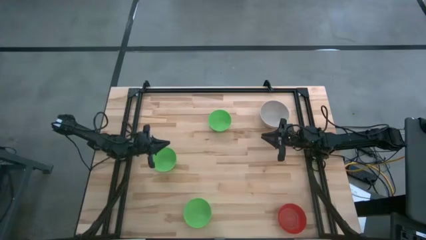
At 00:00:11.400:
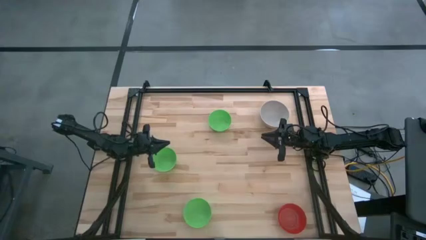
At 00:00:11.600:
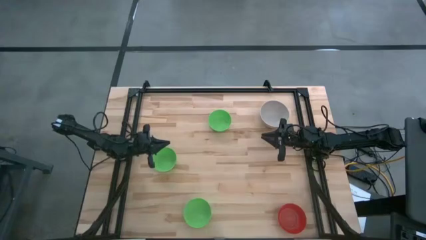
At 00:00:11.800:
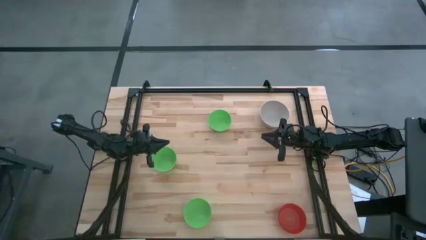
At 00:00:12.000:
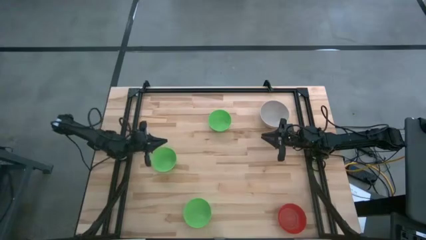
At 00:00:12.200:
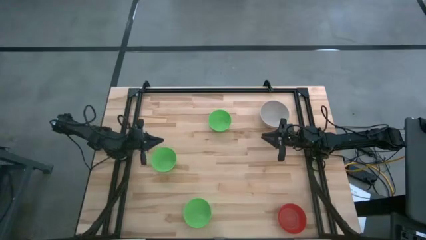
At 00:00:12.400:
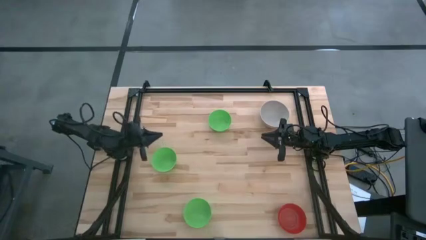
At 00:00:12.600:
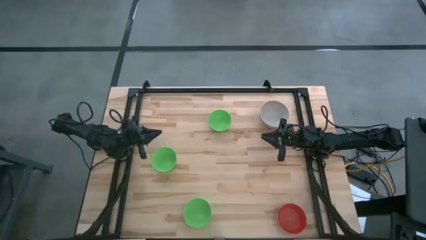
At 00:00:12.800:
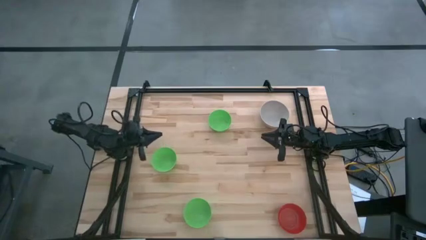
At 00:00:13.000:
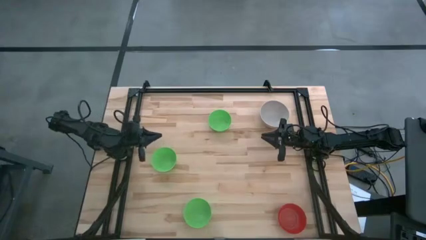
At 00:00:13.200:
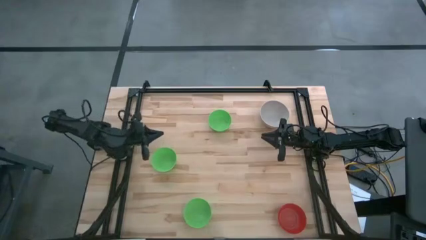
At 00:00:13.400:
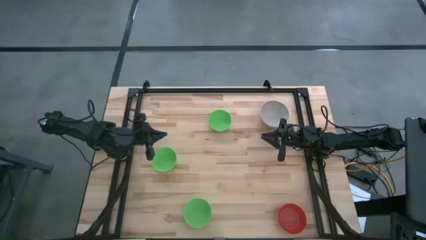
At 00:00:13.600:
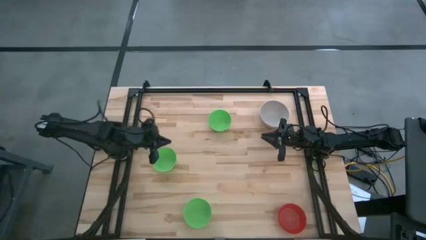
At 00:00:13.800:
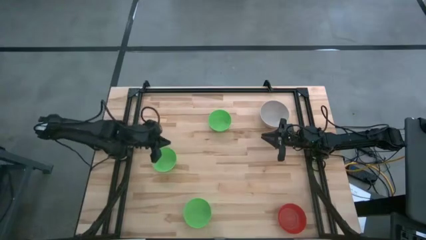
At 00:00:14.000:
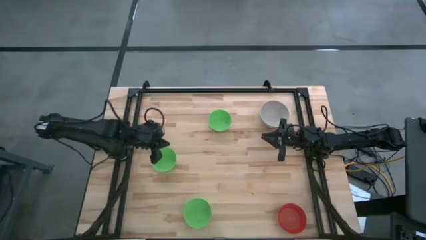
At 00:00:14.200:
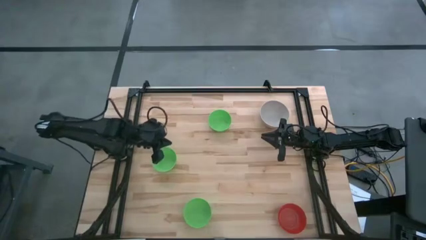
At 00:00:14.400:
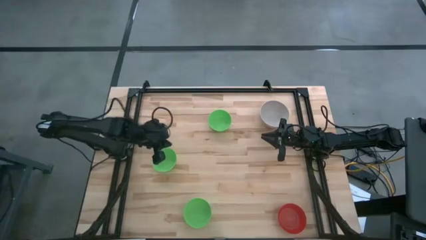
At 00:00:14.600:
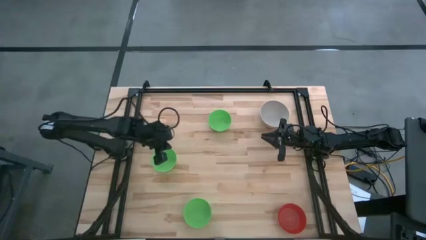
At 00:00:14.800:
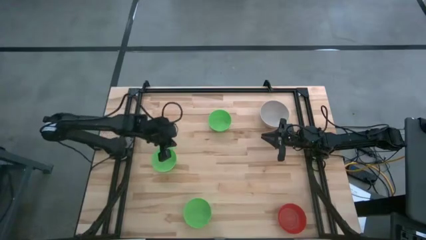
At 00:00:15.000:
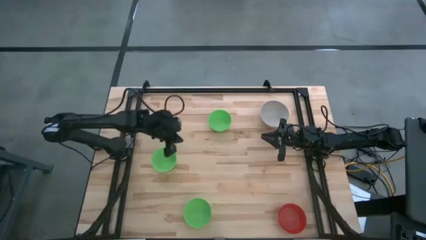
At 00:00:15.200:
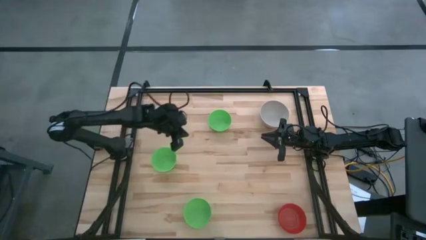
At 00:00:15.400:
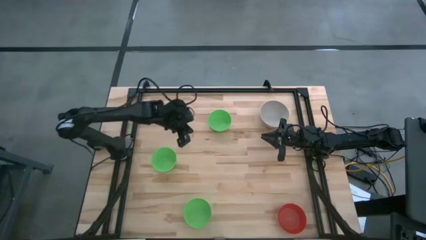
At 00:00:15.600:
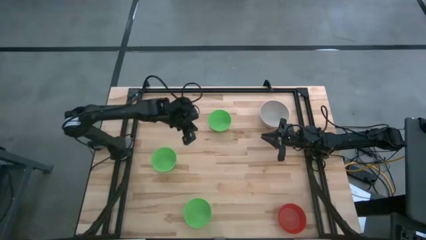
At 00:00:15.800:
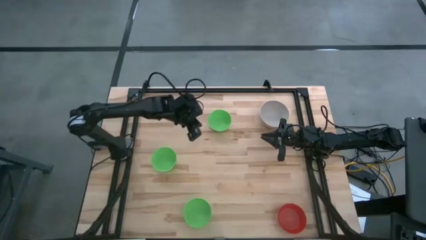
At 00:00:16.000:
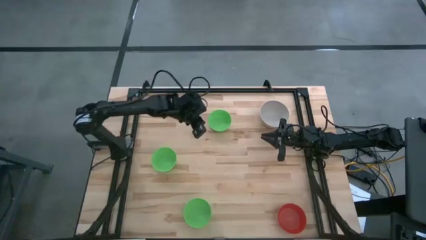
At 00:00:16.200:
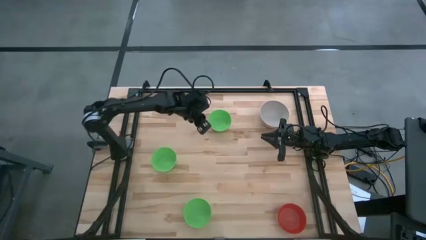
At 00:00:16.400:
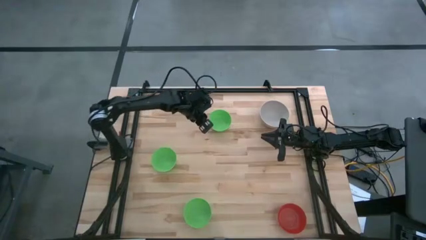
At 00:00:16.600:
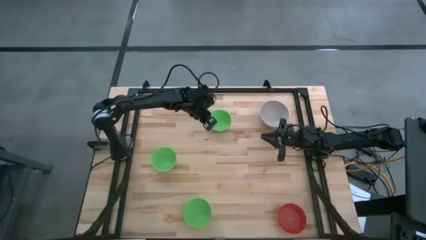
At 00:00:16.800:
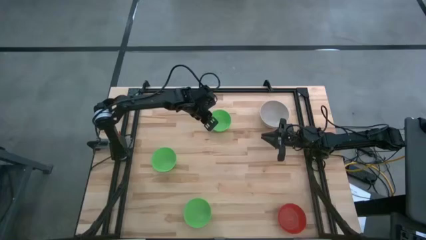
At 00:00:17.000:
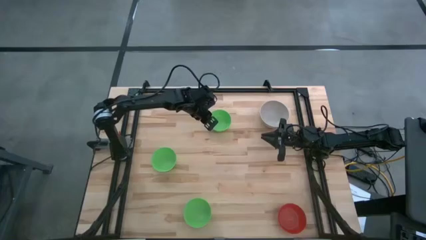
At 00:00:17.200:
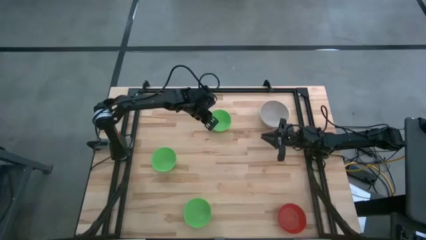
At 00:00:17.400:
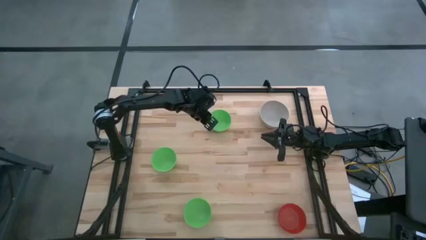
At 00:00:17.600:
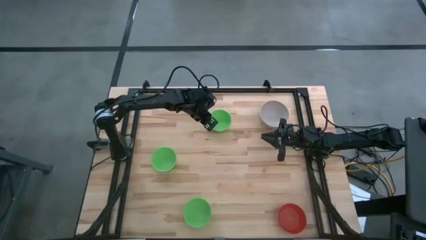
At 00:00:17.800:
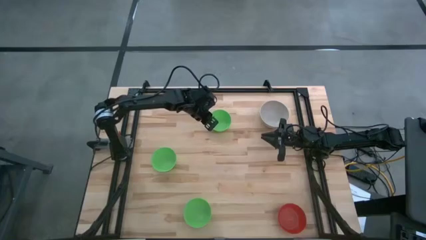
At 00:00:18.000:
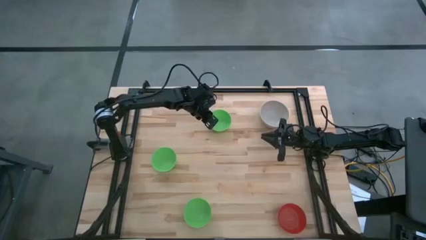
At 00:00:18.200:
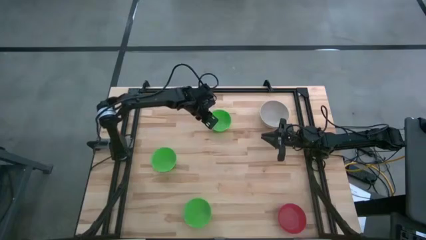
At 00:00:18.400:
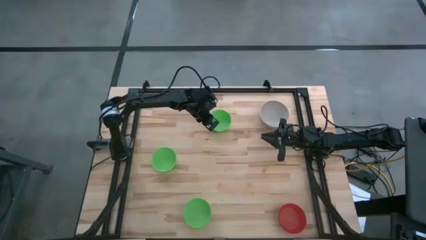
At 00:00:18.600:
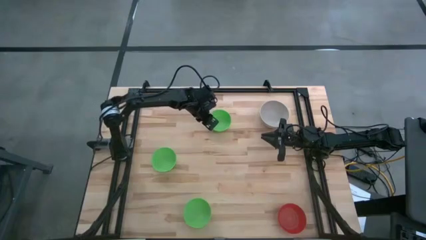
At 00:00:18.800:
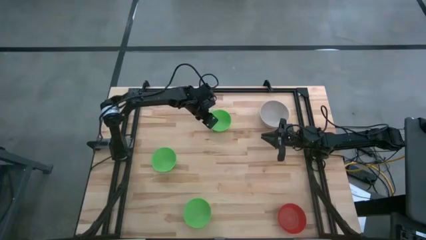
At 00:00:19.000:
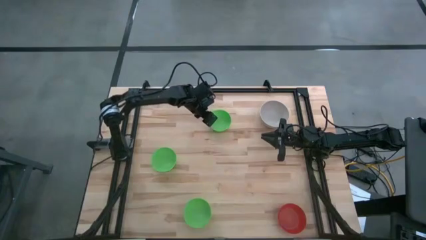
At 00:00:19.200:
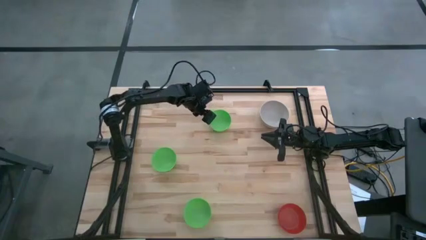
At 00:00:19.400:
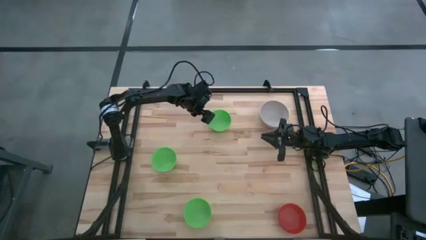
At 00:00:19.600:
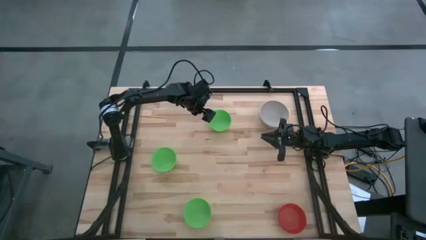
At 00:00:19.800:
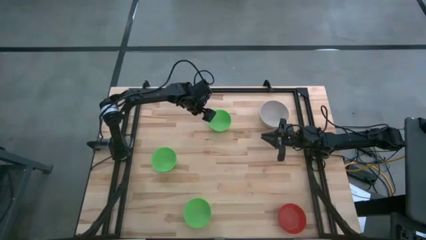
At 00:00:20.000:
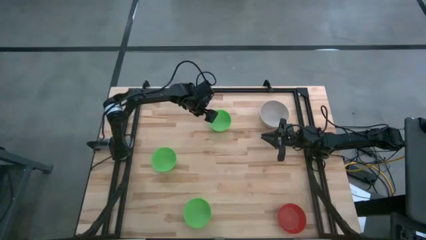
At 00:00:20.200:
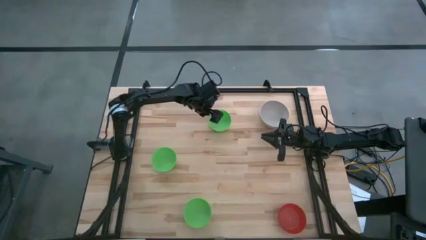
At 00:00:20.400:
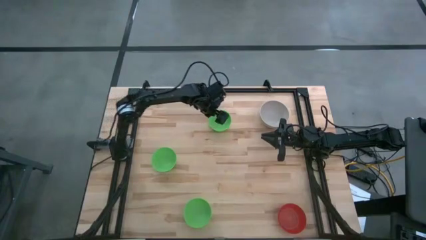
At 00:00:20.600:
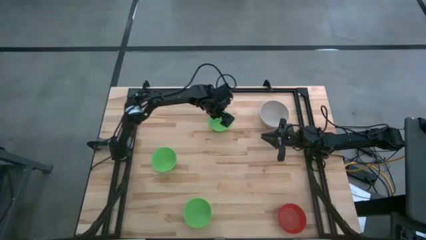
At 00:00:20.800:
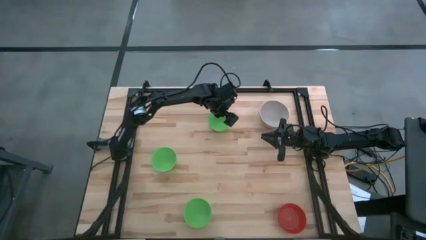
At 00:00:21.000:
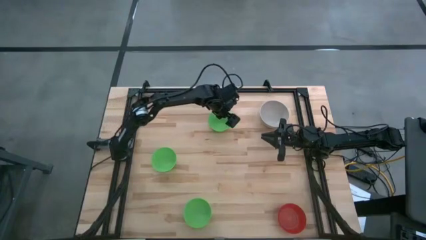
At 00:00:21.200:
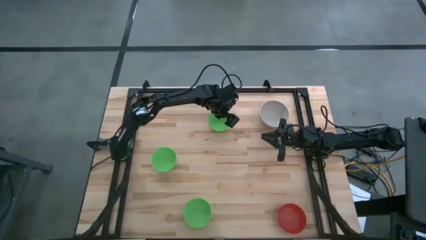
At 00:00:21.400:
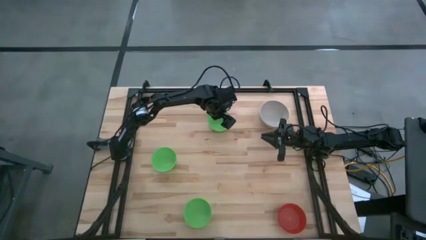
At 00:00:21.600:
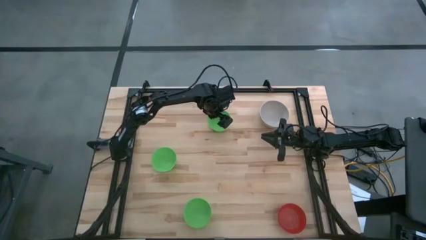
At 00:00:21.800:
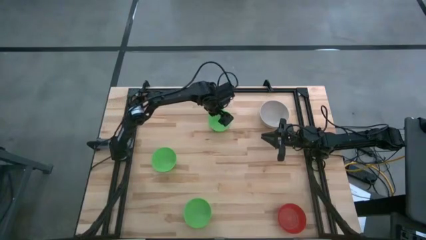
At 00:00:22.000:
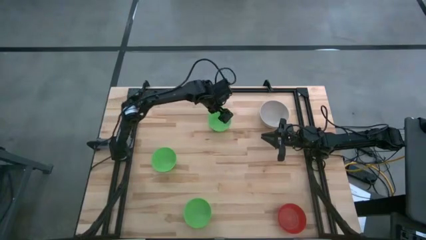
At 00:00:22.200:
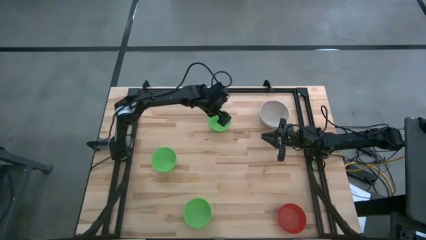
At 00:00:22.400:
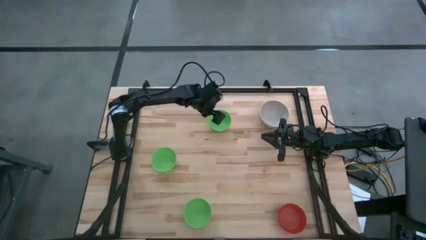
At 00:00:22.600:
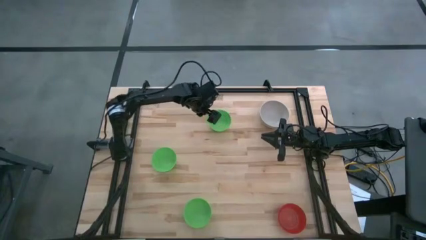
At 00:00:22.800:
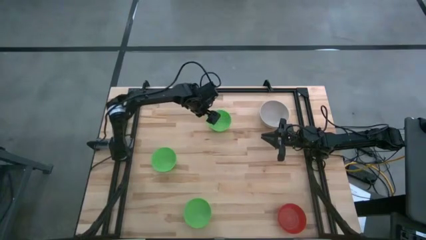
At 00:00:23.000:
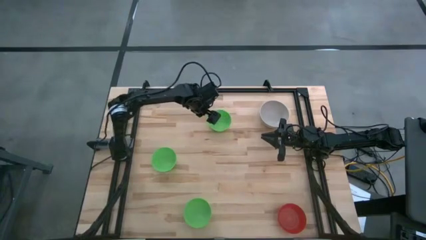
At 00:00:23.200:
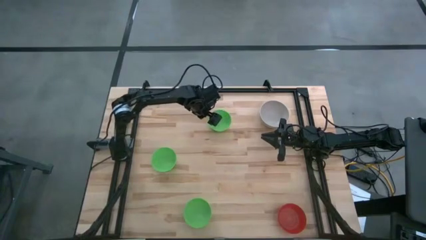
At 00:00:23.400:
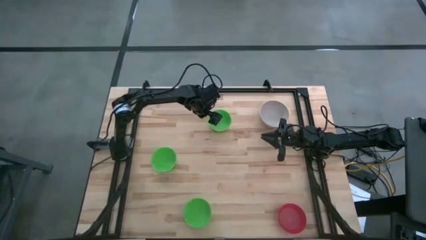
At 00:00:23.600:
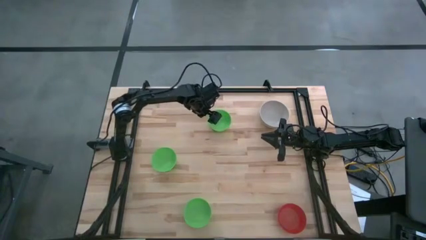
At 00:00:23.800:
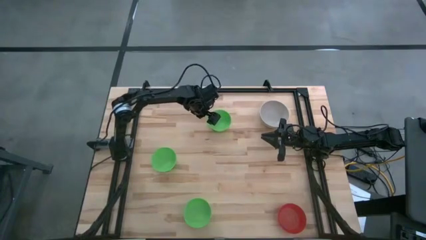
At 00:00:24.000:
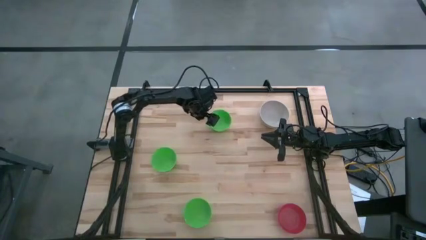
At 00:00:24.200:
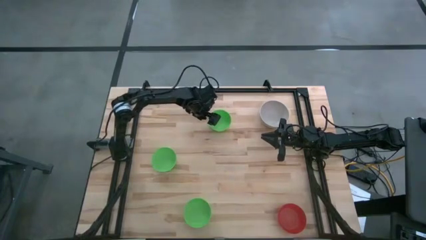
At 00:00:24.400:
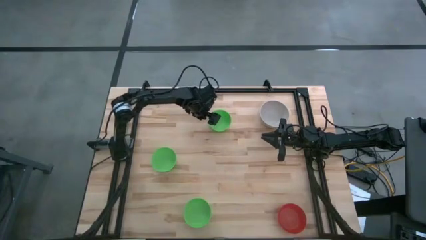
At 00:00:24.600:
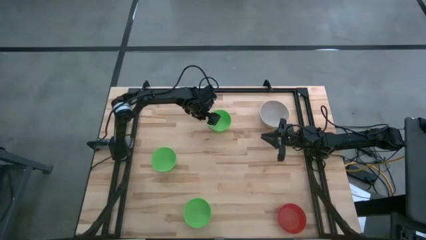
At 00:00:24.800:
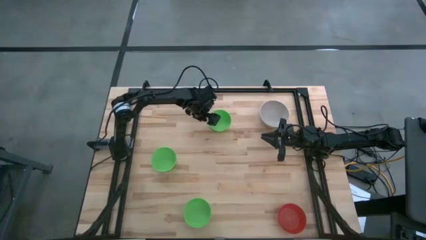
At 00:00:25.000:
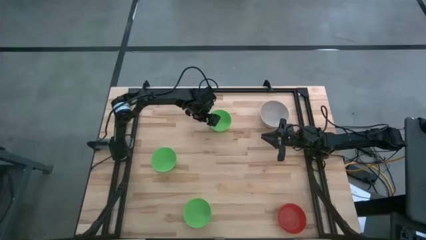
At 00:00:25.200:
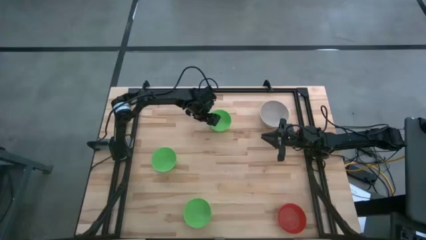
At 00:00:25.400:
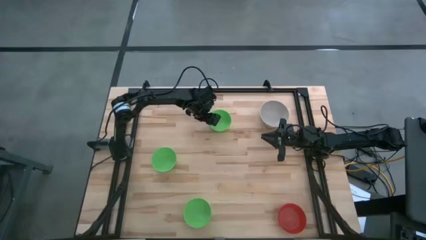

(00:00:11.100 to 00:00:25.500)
Stack the top right green bowl on top of the gray bowl

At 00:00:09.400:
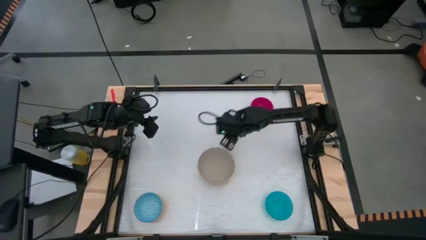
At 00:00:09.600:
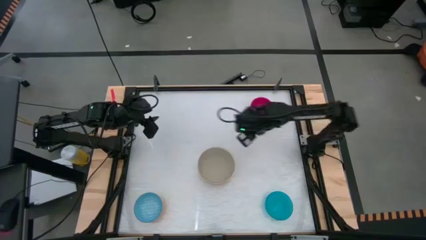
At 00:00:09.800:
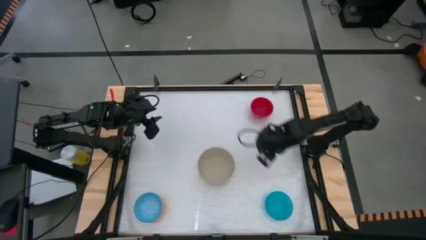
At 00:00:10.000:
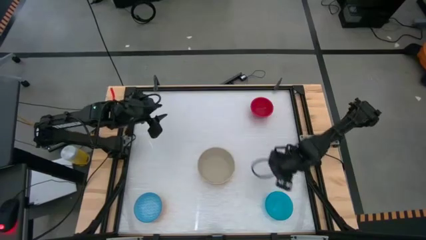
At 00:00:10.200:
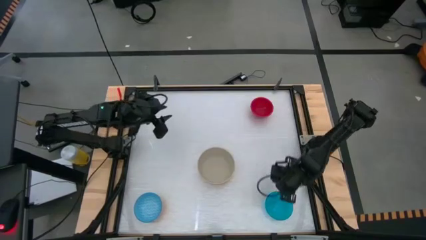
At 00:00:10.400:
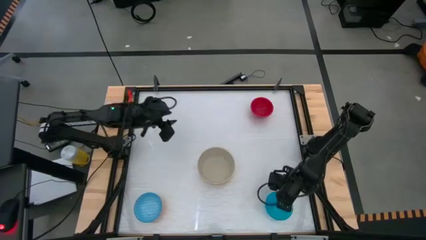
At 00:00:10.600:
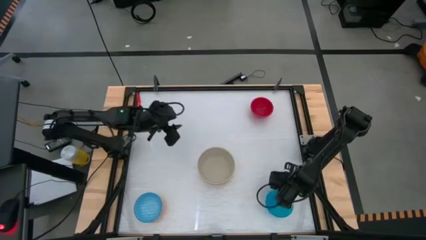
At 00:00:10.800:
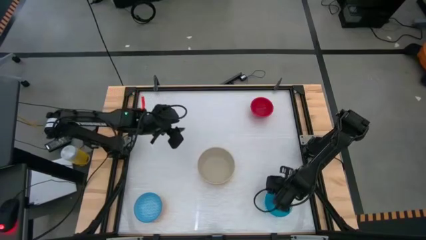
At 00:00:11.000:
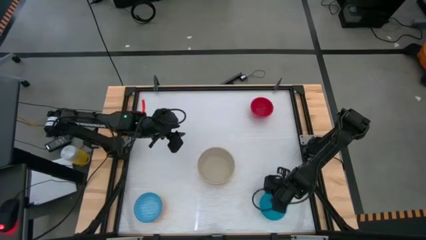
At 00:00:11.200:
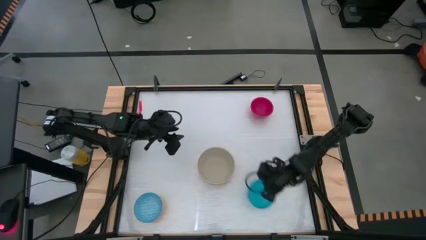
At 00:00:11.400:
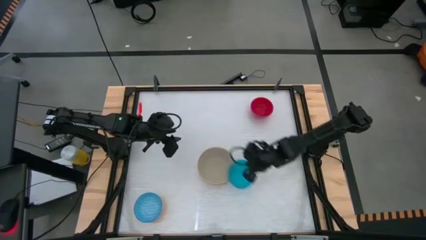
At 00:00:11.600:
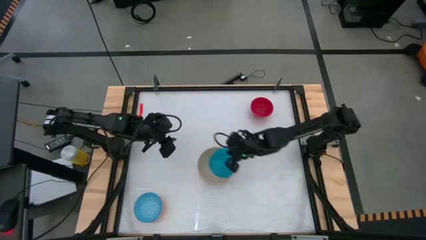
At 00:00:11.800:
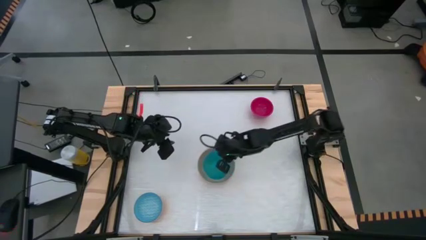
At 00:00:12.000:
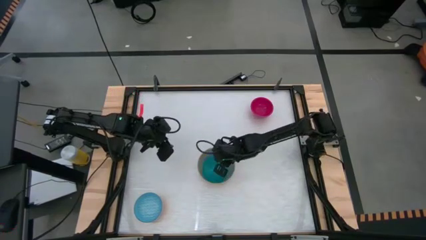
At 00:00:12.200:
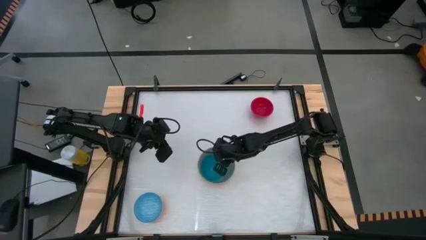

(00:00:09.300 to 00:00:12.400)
Stack the blue bowl on top of the gray bowl
